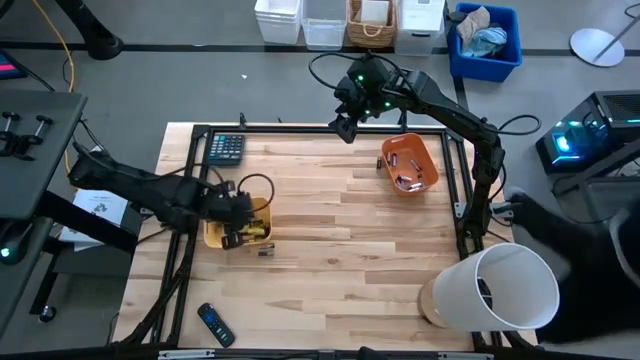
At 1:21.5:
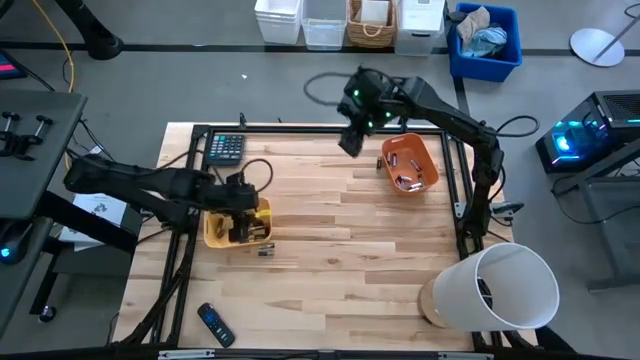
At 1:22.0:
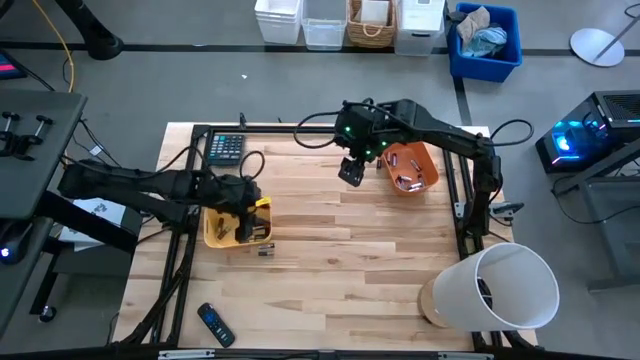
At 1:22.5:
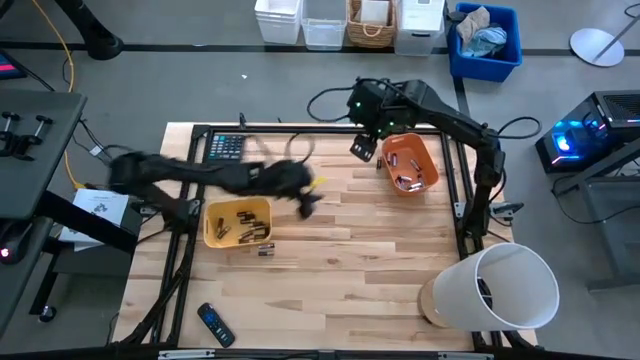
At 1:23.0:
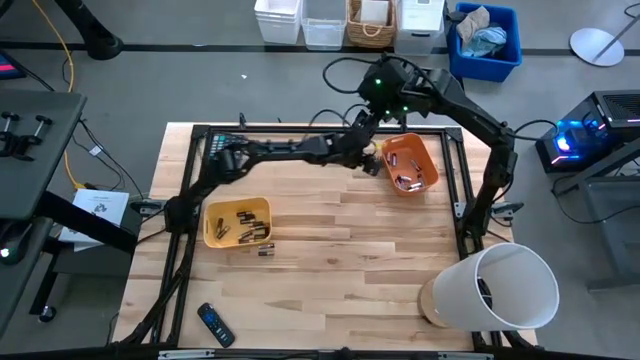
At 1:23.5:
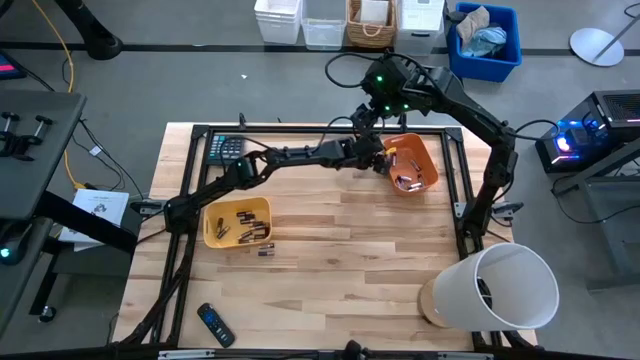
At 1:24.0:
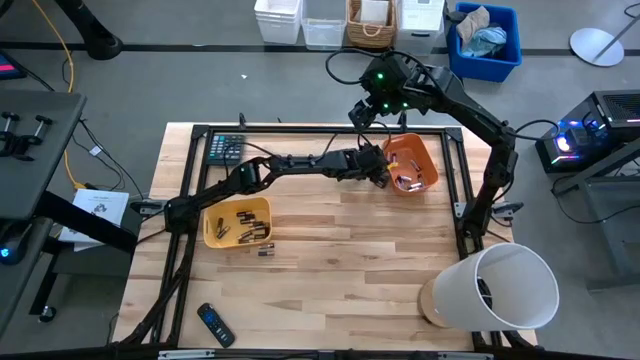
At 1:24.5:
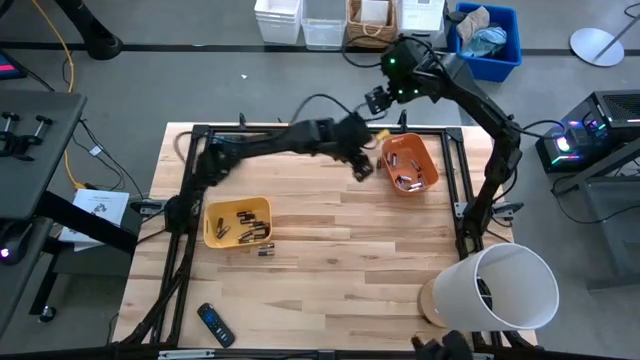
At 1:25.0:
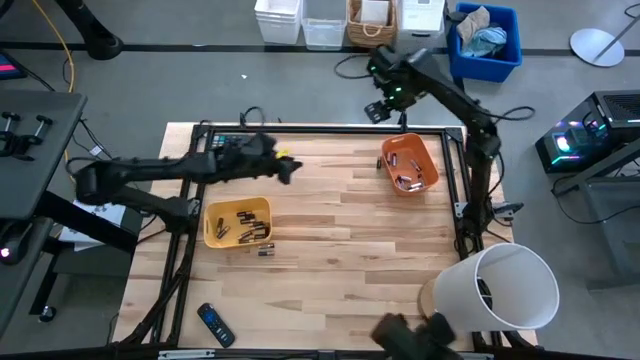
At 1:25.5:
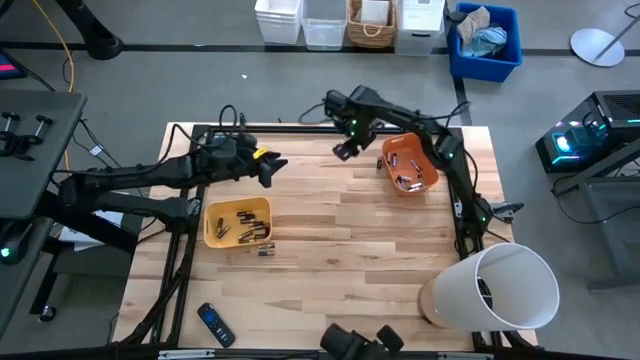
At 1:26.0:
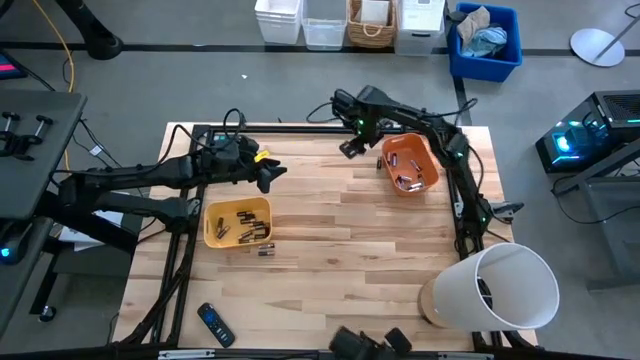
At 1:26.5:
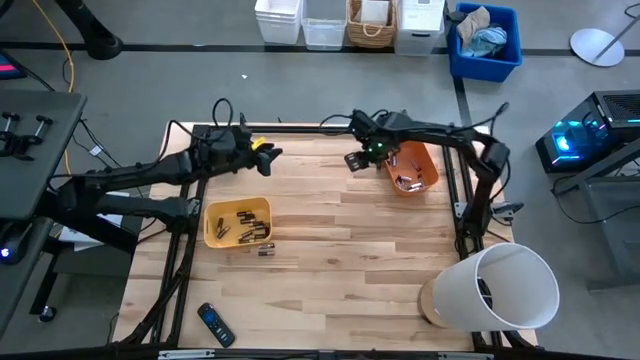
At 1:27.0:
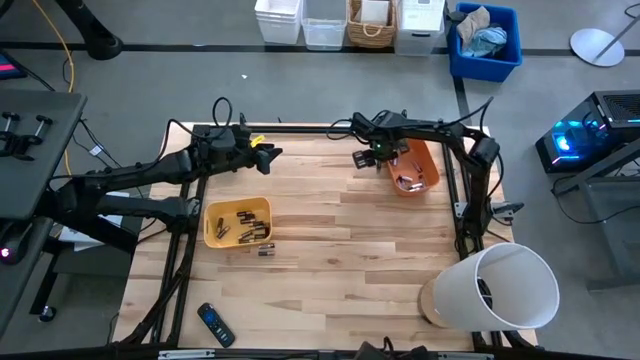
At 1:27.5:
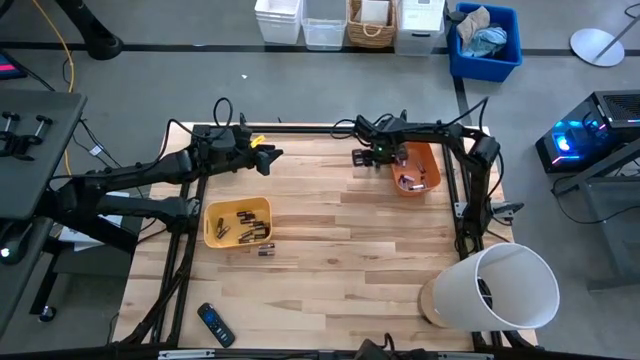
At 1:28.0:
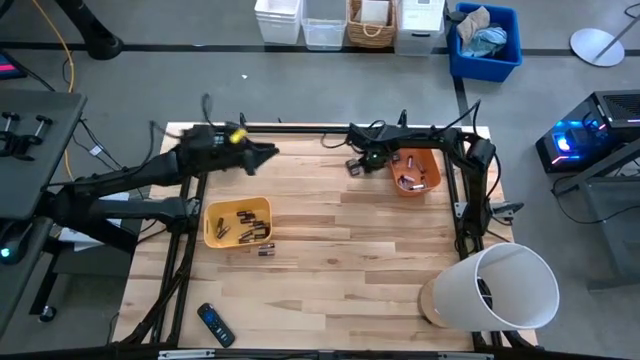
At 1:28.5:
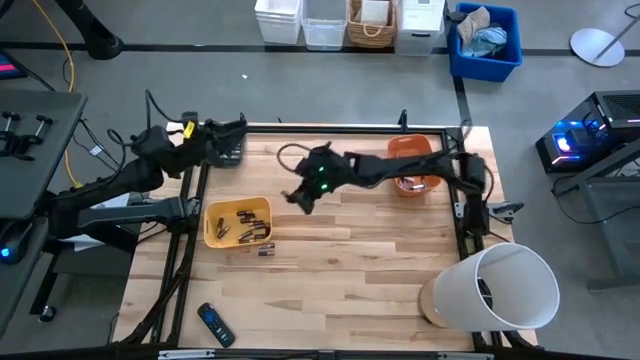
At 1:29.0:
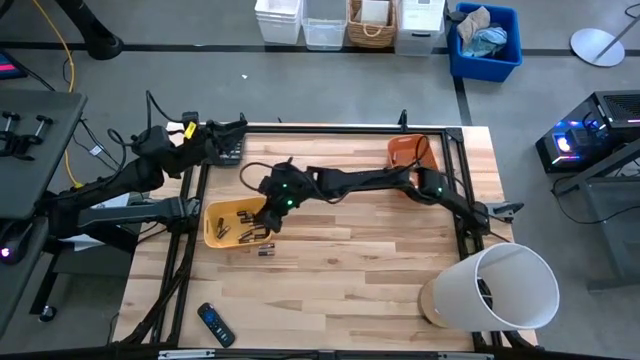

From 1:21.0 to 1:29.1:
Task: Sort batteries
Put the black battery into the yellow bin

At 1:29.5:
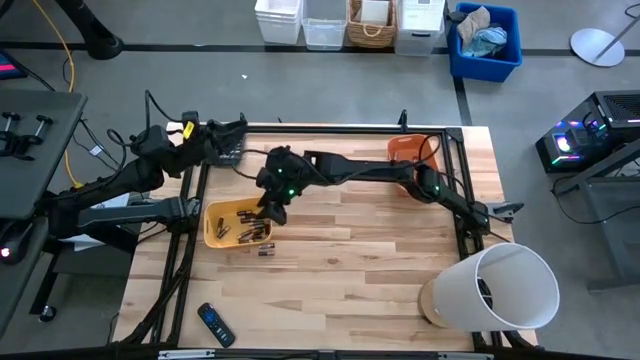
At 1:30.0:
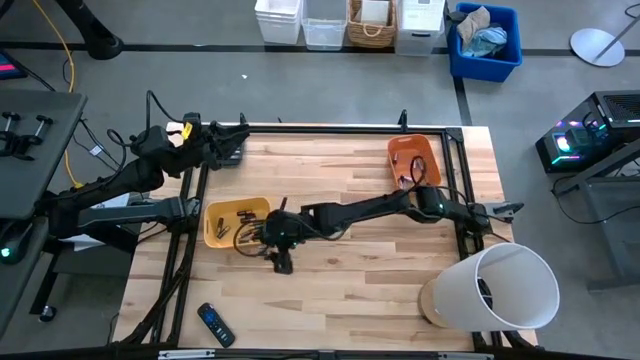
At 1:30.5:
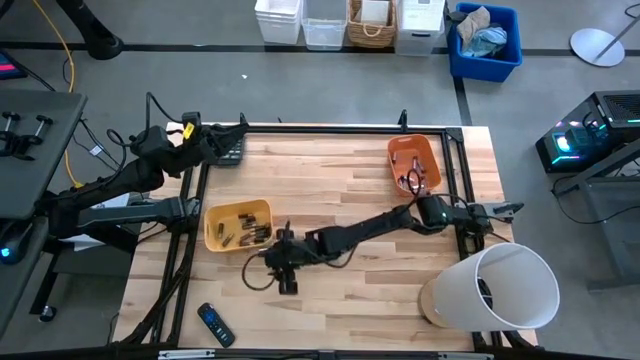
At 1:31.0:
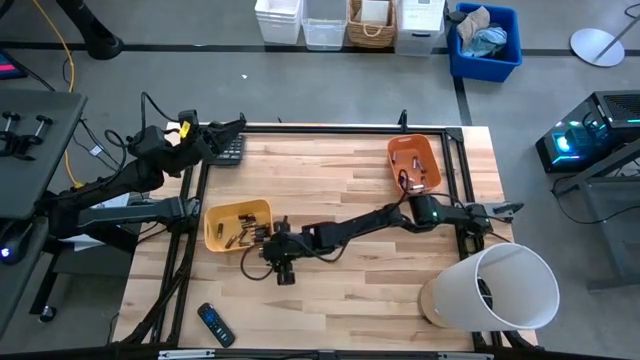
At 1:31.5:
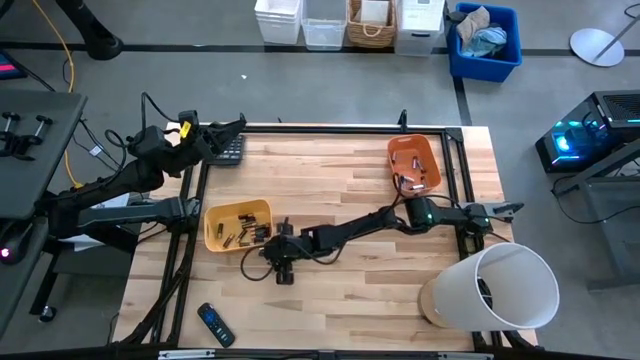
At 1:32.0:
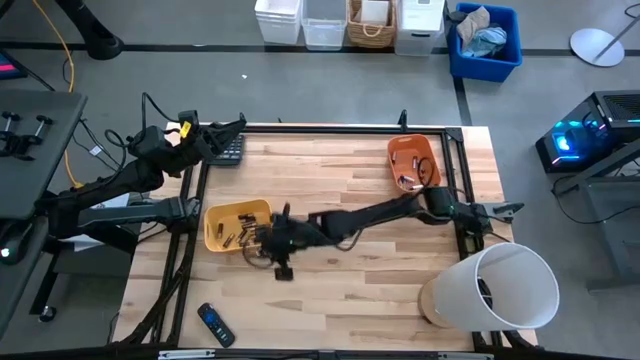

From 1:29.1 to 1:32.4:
Put the black battery into the yellow bin

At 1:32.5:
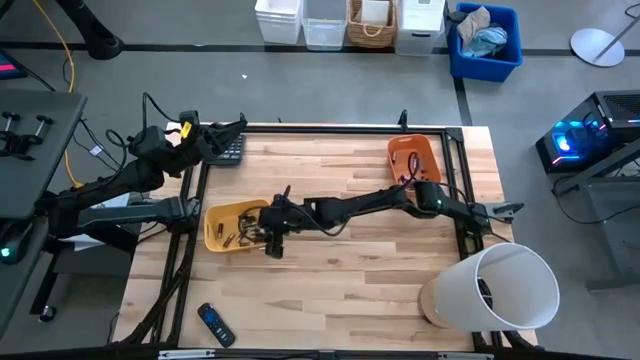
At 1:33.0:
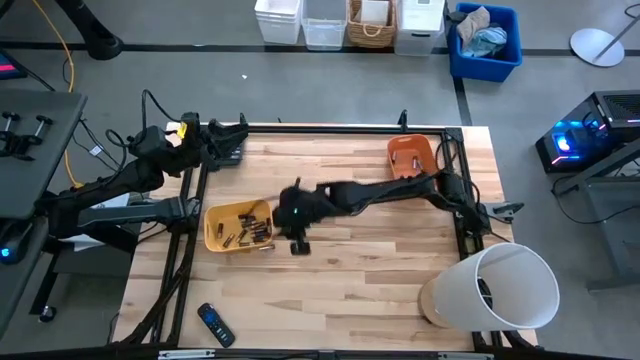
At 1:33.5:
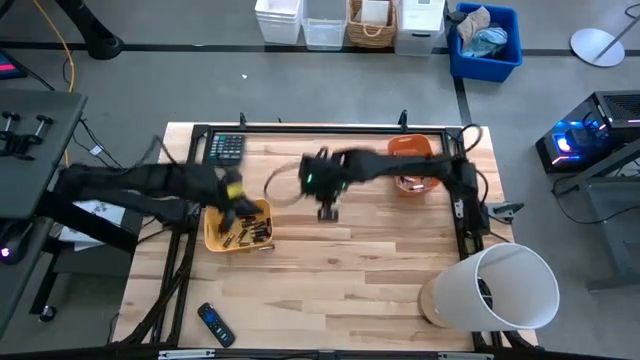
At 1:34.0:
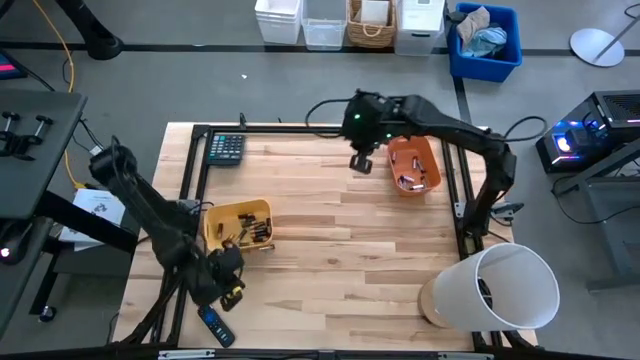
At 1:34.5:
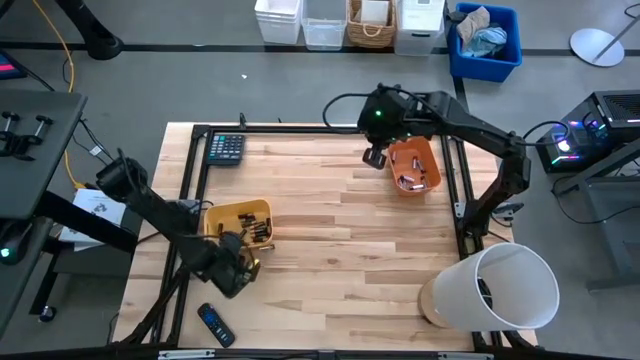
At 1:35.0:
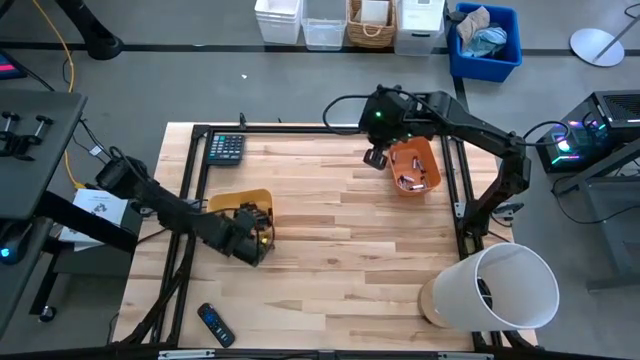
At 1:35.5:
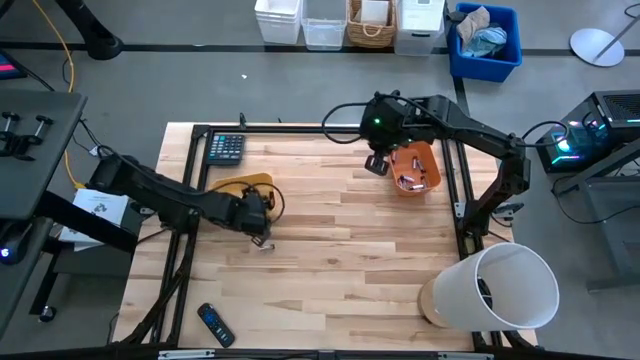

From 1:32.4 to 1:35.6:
Adjust the yellow bin

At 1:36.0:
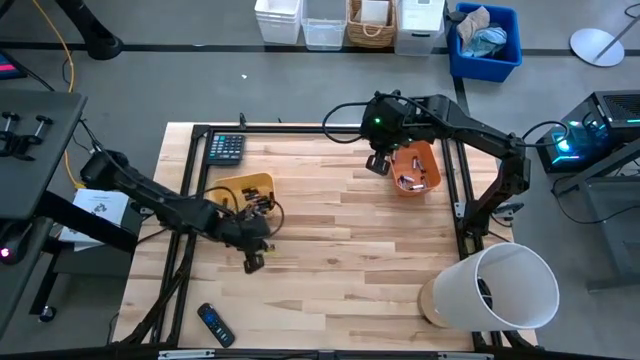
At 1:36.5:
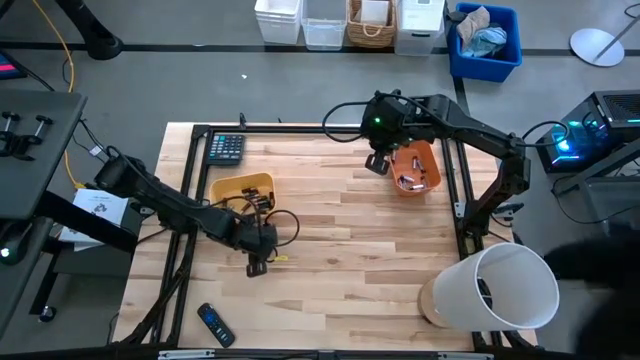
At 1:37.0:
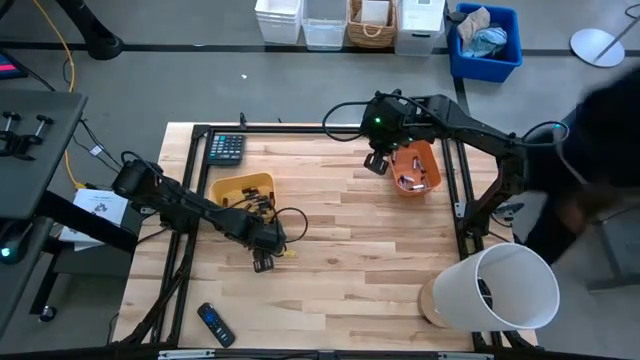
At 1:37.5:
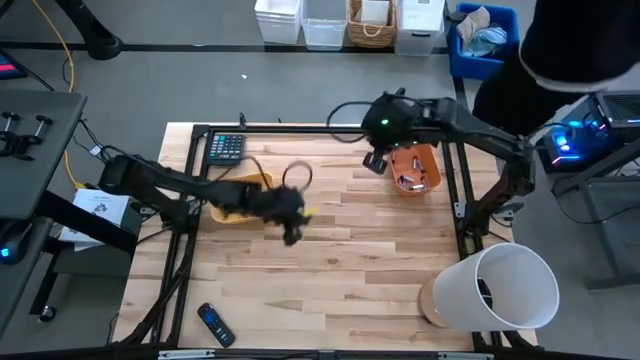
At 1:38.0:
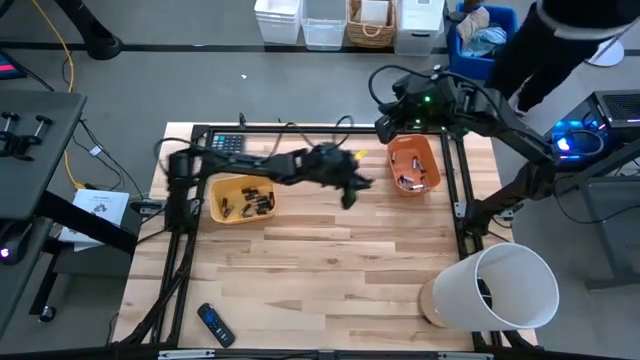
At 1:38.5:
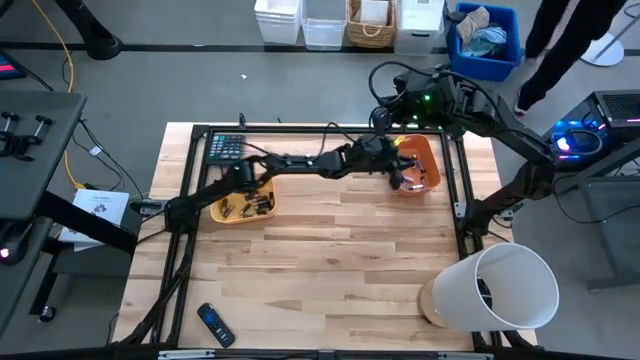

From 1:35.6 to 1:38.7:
Put the silver battery into the orange bin

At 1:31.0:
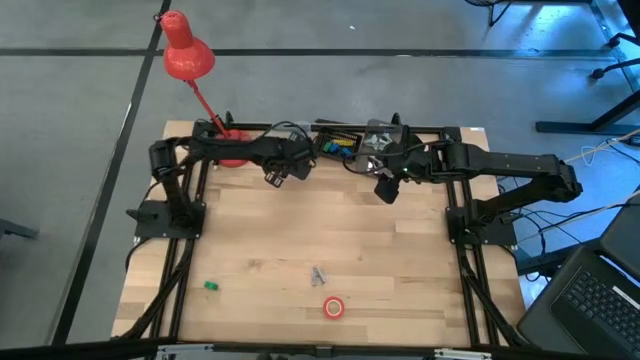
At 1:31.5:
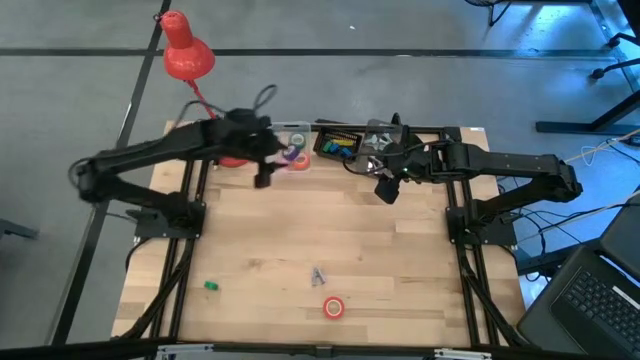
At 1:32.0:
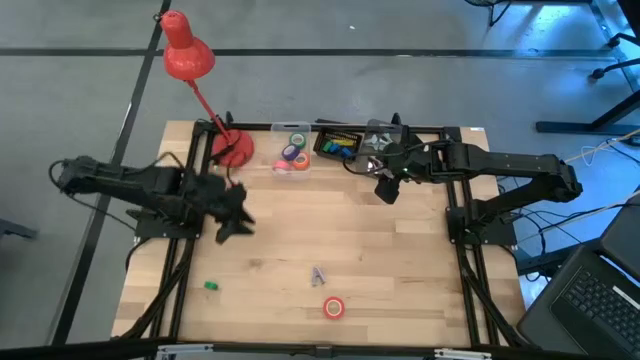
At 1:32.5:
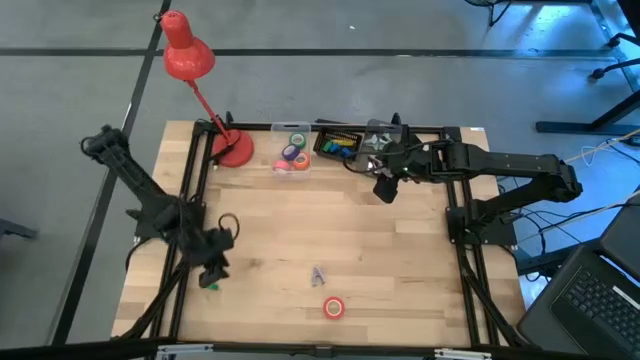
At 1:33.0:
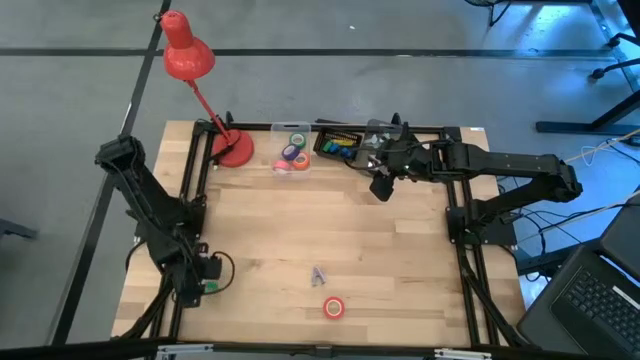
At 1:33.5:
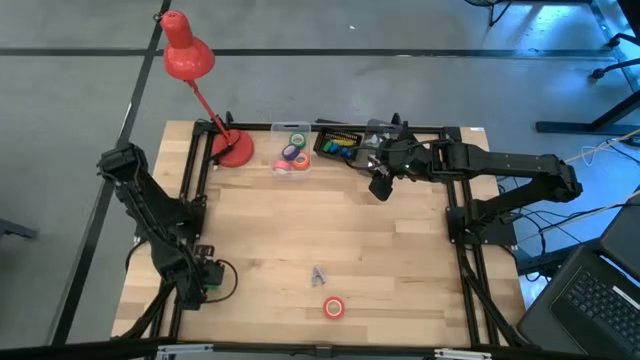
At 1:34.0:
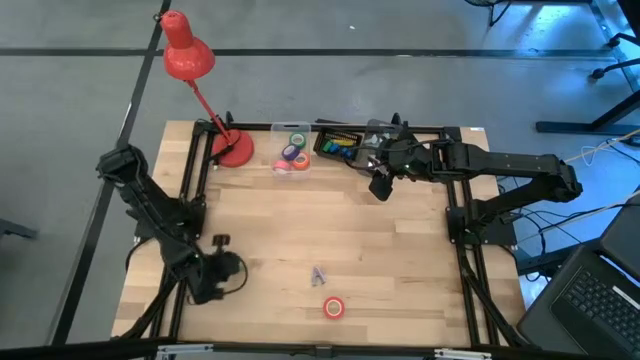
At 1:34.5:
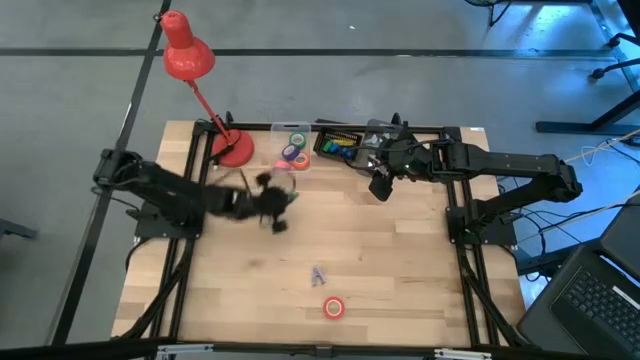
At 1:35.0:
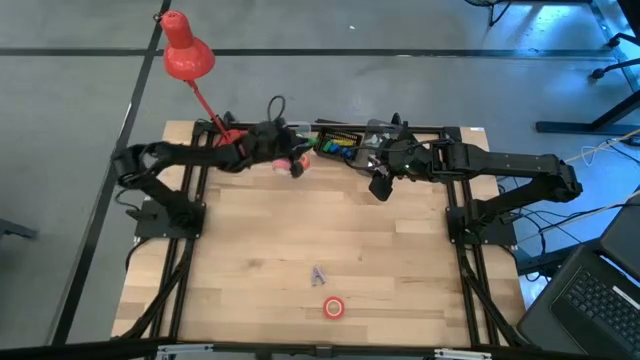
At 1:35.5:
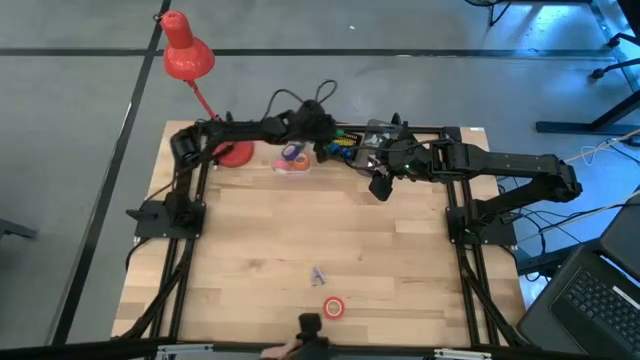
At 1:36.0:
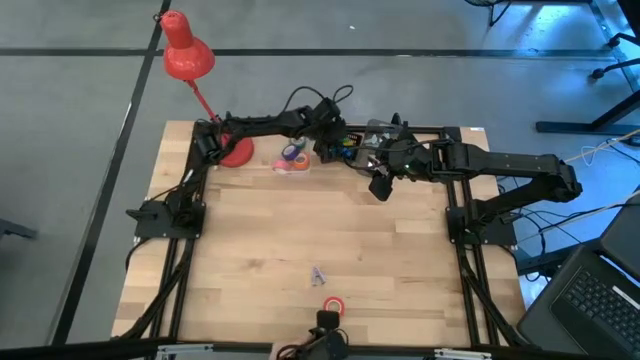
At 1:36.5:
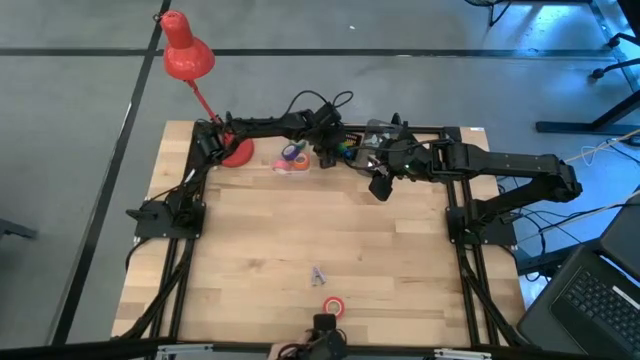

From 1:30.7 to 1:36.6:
Task: Pick and place Stapler, Stapler remover, tape
Put the green stapler into the left black bin
